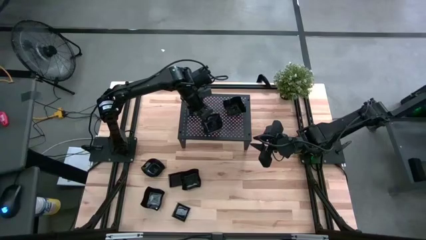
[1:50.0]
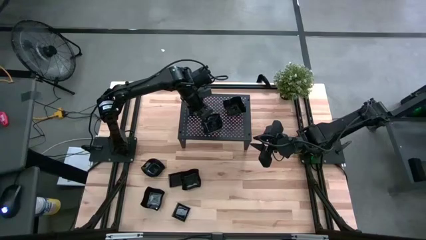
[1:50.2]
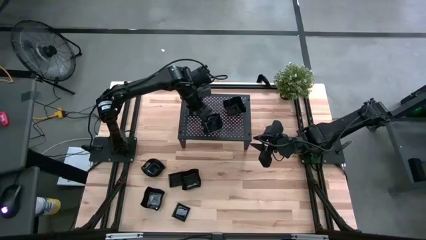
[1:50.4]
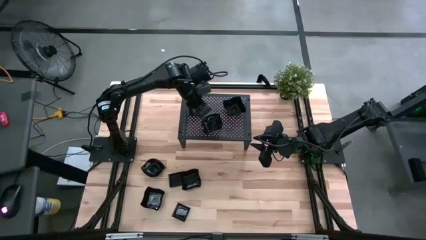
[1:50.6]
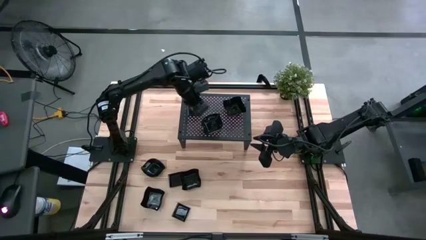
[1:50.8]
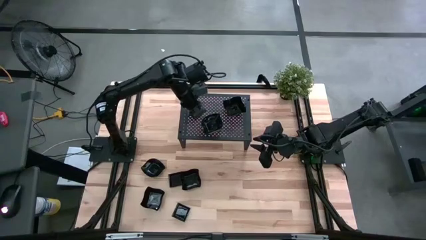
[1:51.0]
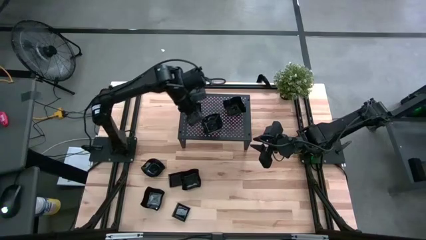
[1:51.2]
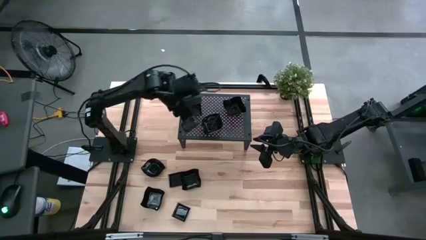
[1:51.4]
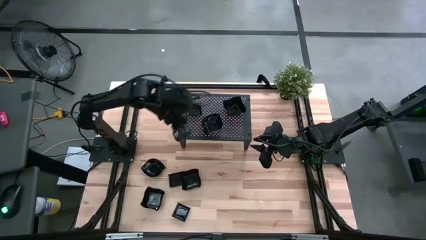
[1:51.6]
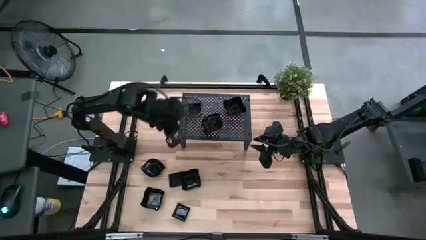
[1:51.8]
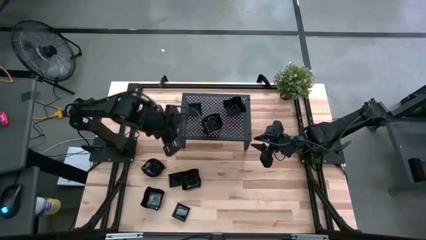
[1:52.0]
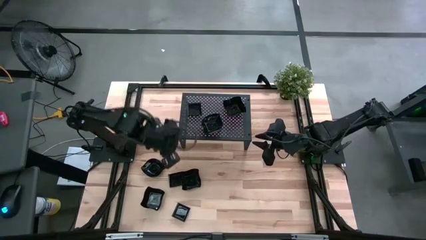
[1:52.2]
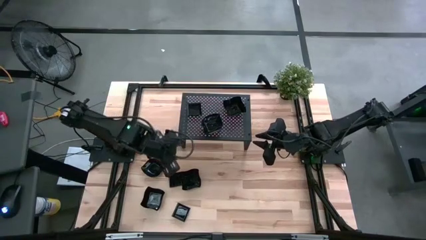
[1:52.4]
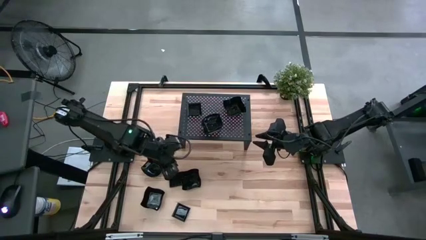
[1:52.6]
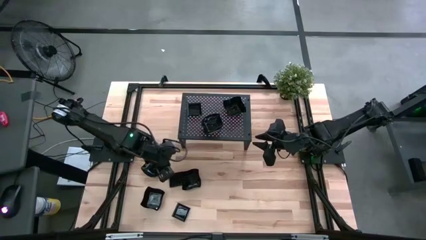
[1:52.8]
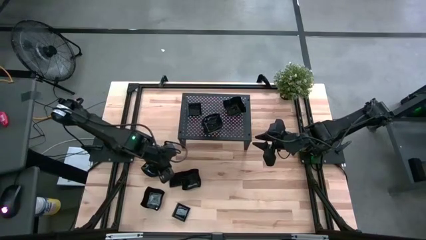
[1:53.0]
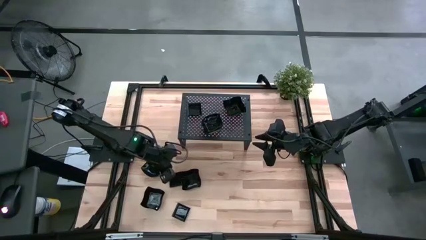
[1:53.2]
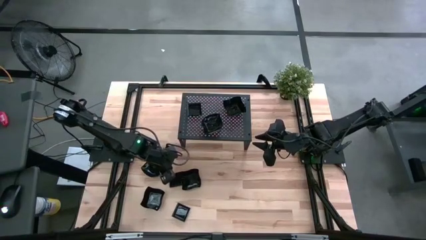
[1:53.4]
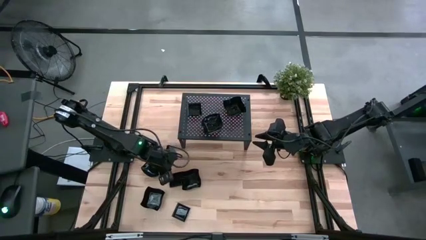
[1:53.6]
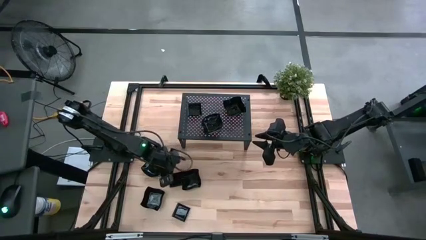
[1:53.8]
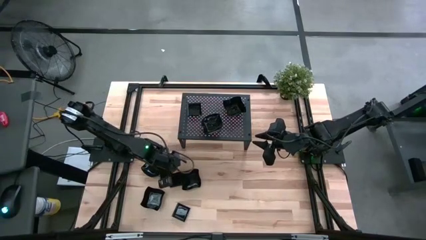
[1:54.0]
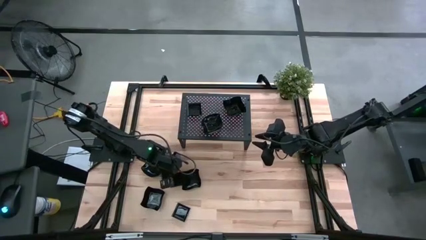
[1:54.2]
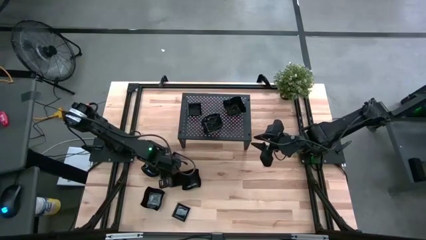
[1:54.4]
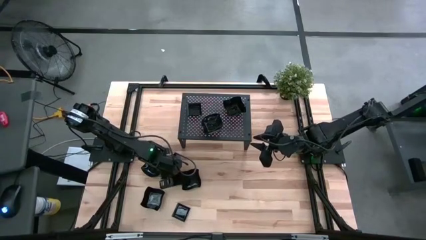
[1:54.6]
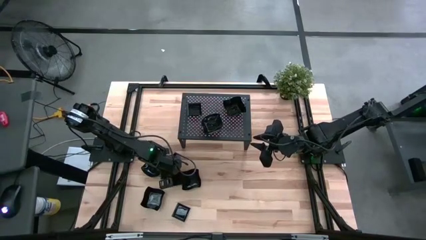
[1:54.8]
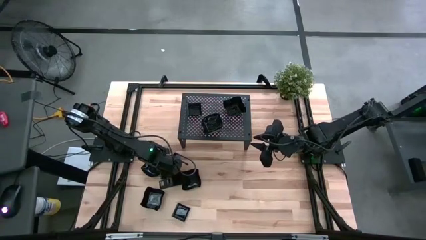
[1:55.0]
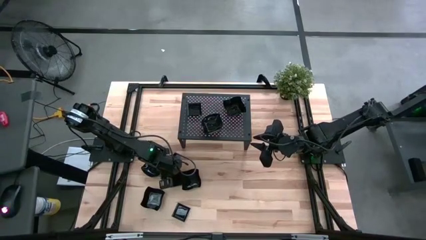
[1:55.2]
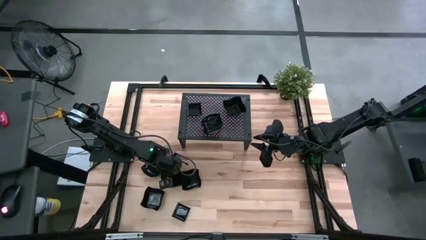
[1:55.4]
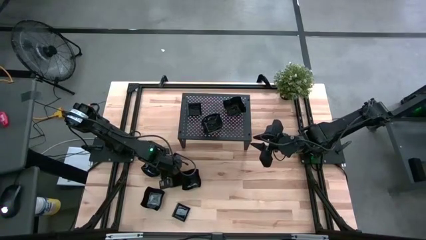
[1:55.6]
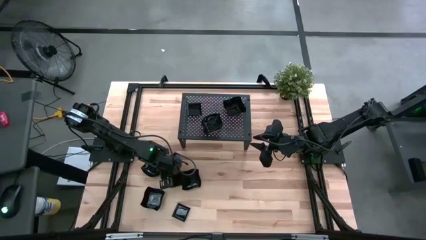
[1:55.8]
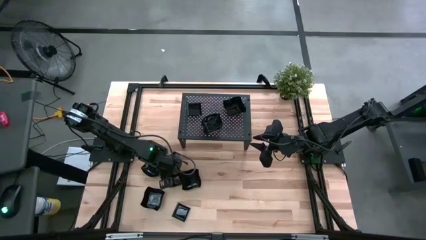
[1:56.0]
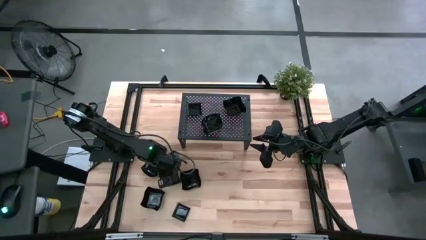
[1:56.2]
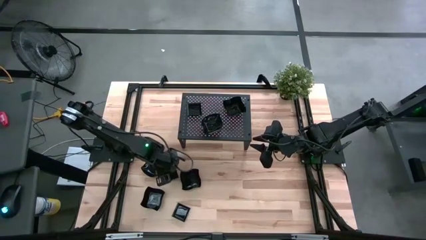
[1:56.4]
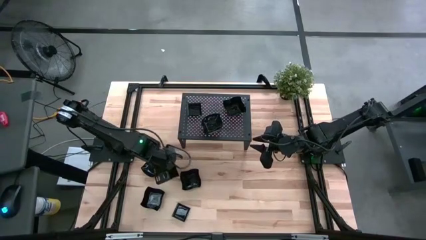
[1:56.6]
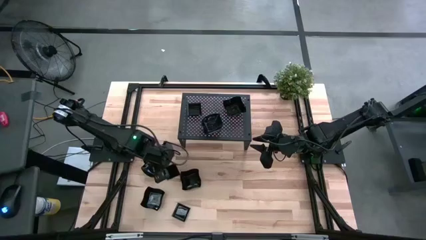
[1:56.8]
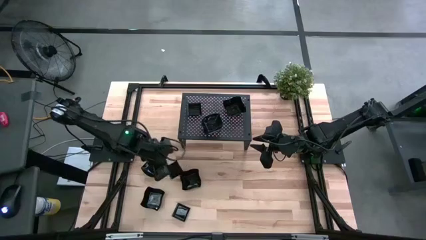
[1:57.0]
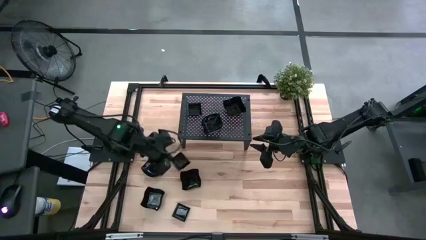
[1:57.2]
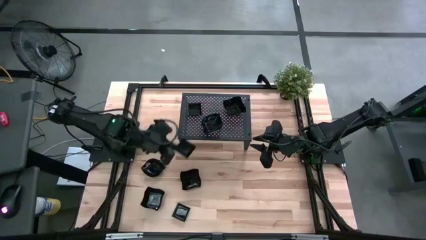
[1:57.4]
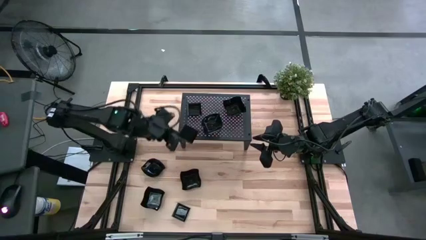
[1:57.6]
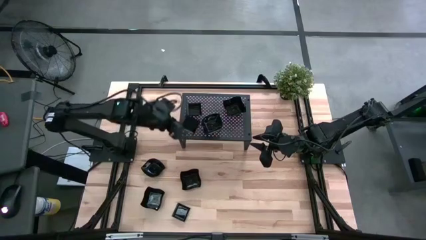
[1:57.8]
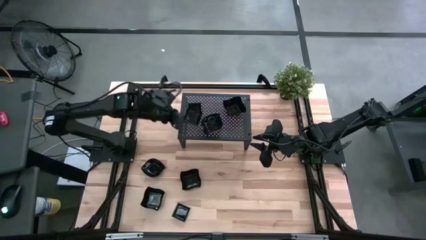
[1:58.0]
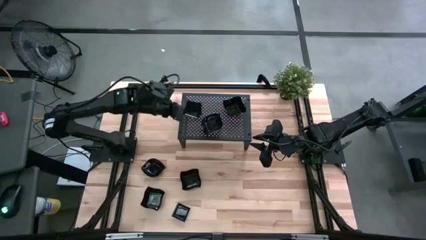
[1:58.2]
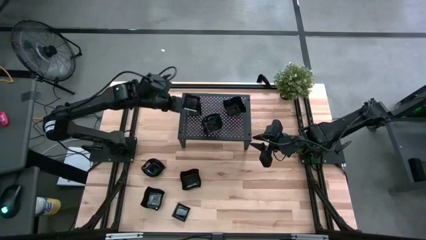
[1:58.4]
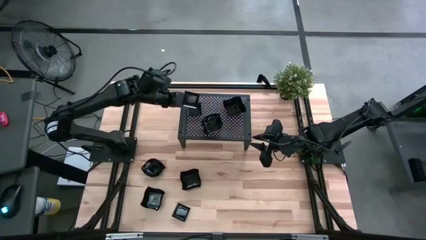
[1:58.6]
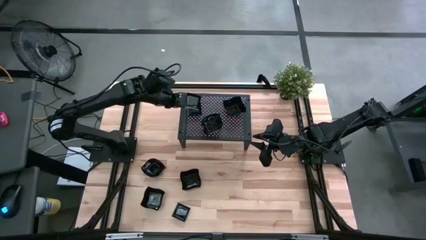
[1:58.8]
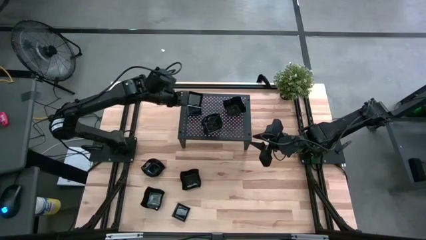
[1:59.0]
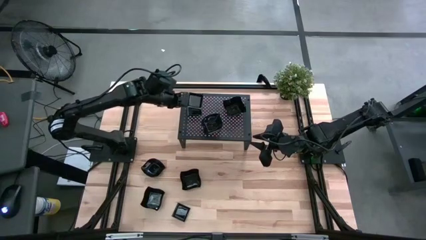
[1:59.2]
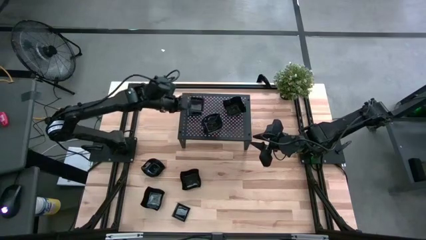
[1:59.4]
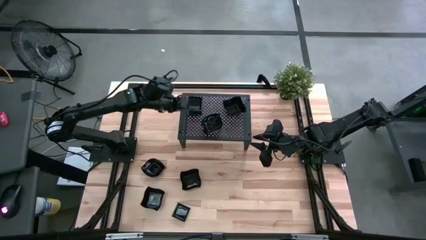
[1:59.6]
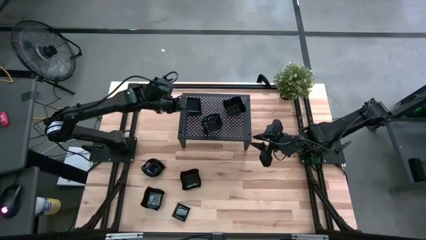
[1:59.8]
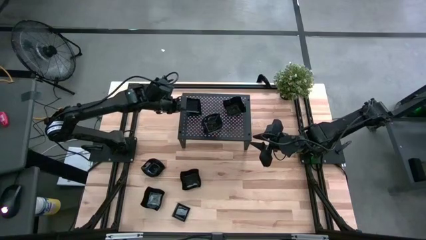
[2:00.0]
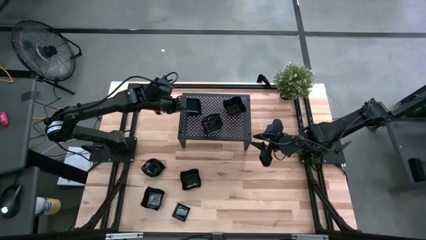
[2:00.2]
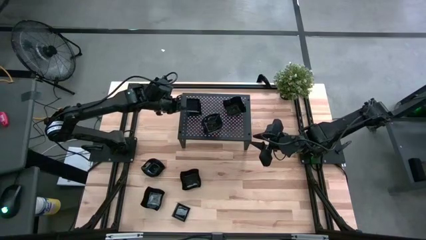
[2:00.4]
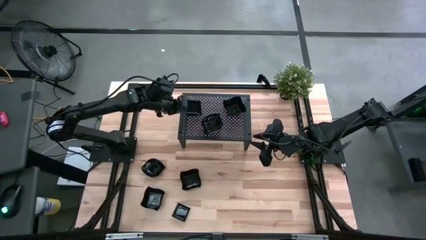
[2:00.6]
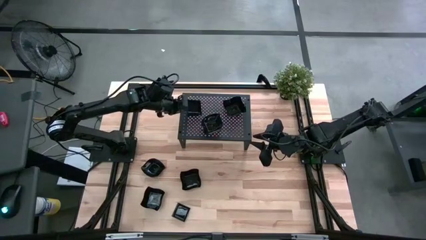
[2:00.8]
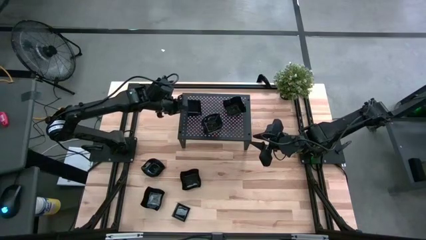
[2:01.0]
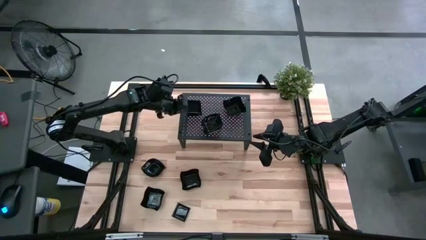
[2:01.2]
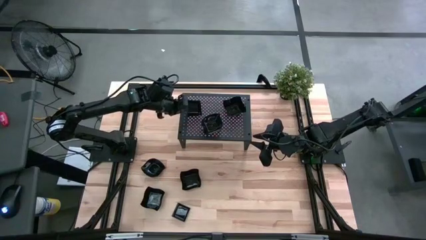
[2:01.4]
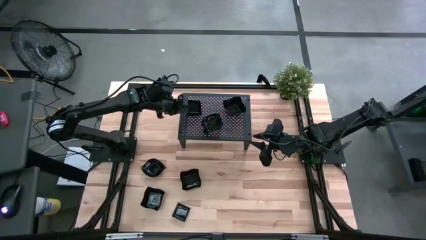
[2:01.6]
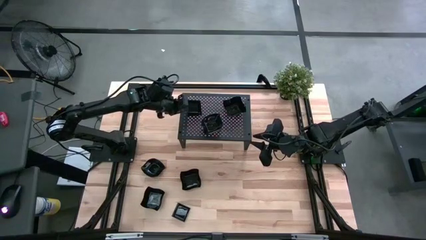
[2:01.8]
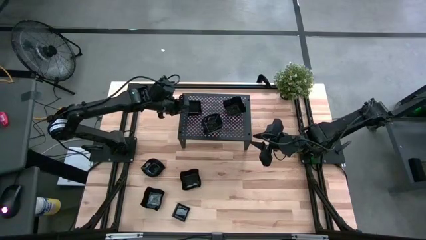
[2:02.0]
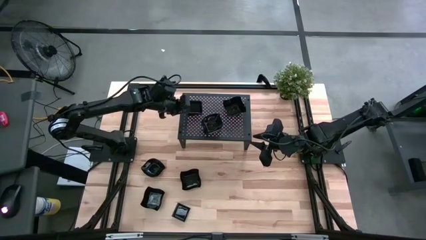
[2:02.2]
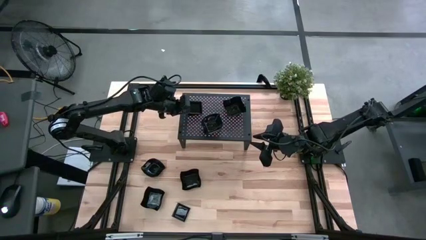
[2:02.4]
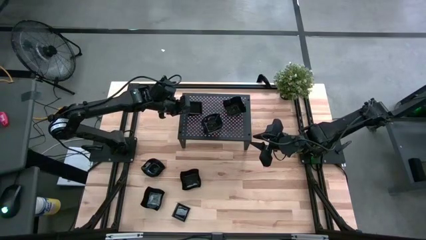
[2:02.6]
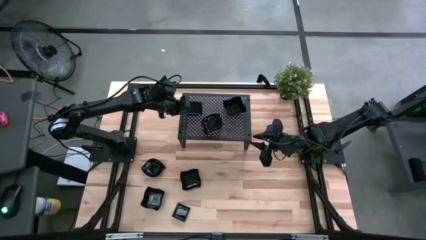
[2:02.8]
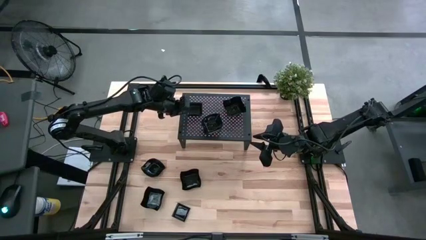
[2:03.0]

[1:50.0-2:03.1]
Task: Pick & Place Mini shaped plates
Stack the black square plate on top of the black square plates on the shelf
